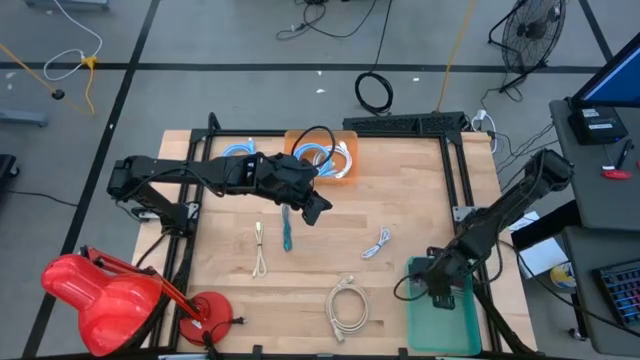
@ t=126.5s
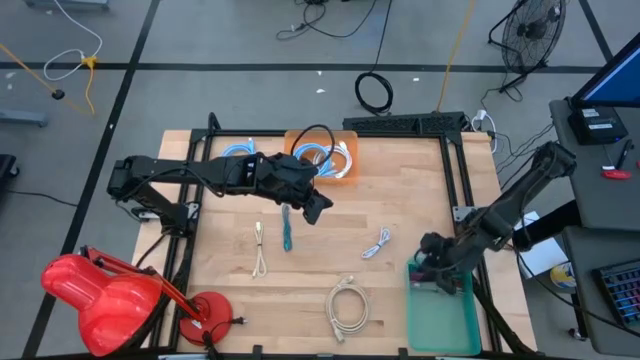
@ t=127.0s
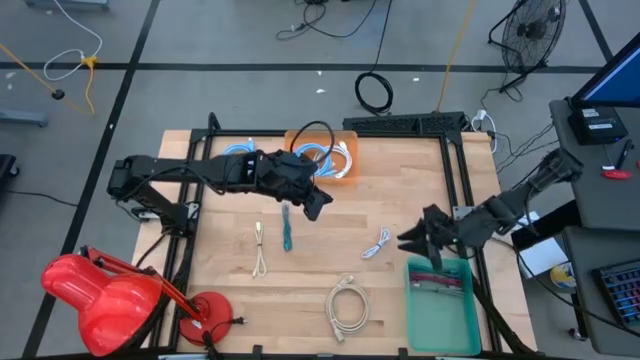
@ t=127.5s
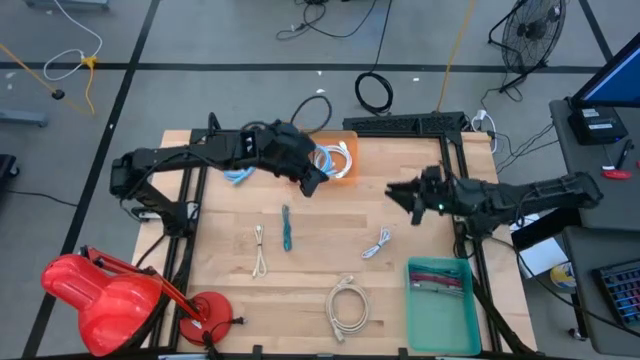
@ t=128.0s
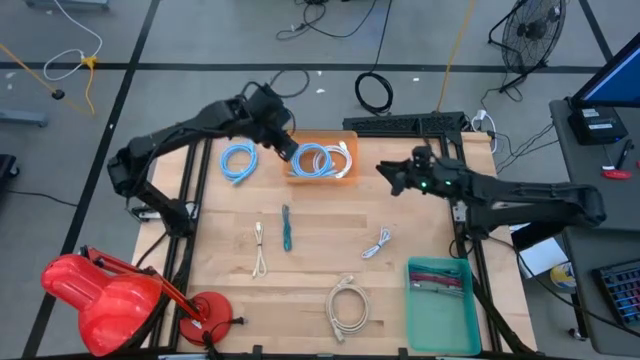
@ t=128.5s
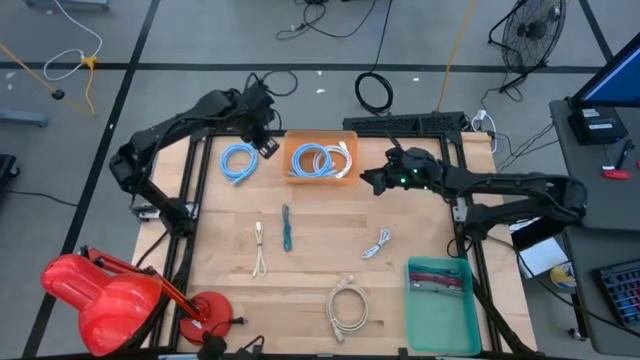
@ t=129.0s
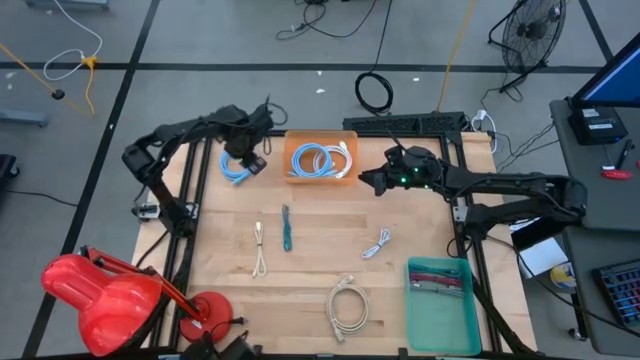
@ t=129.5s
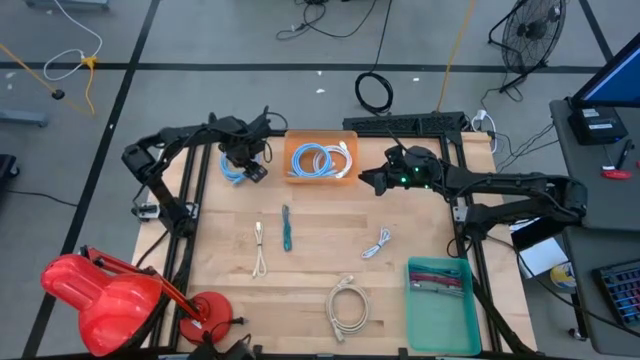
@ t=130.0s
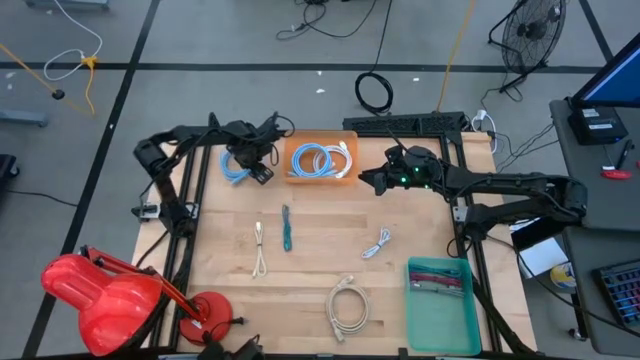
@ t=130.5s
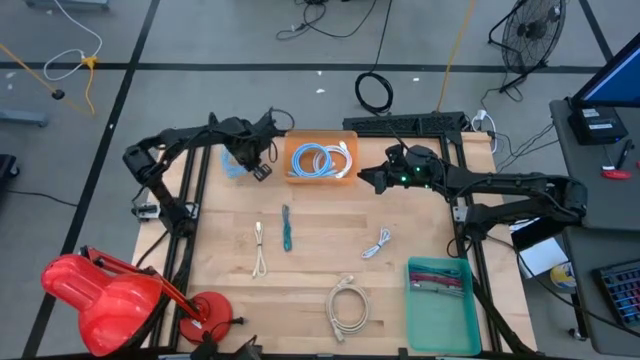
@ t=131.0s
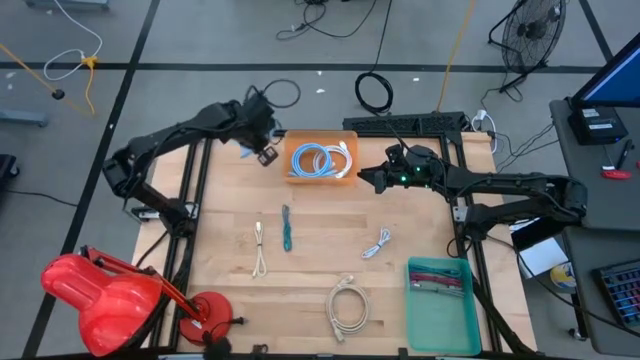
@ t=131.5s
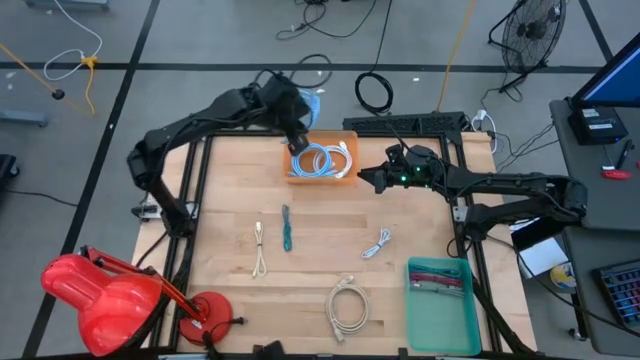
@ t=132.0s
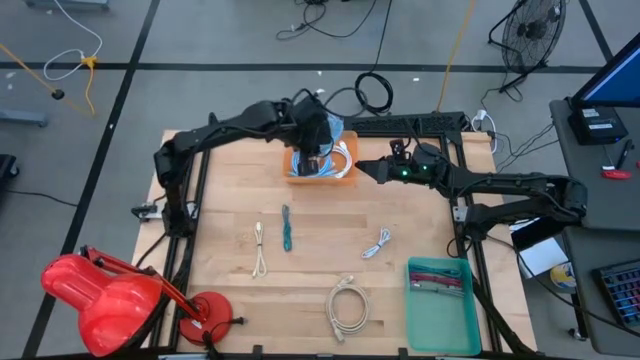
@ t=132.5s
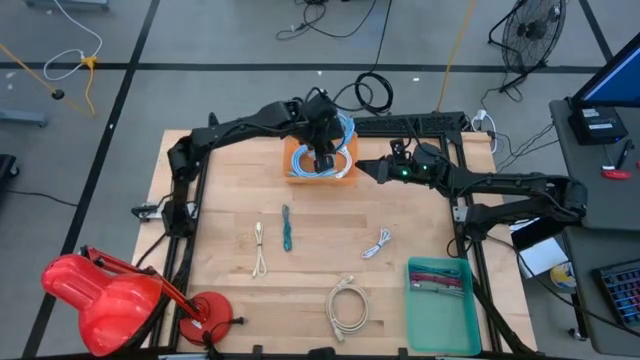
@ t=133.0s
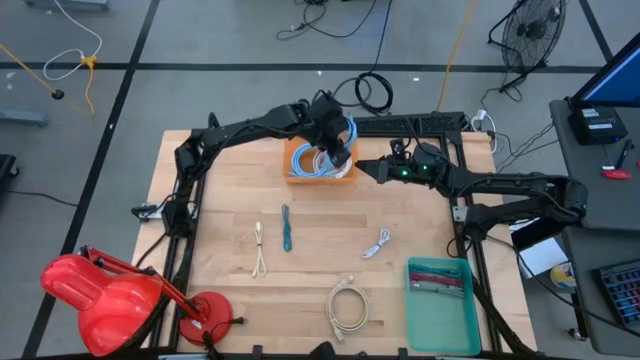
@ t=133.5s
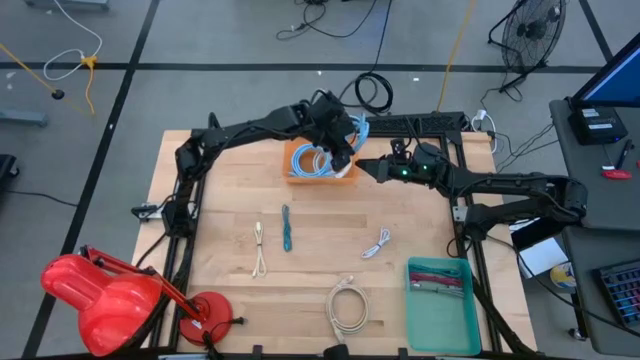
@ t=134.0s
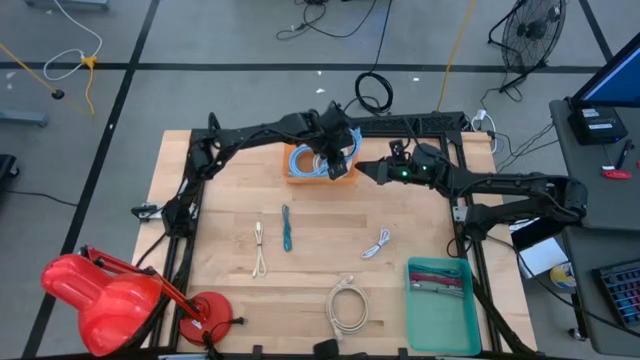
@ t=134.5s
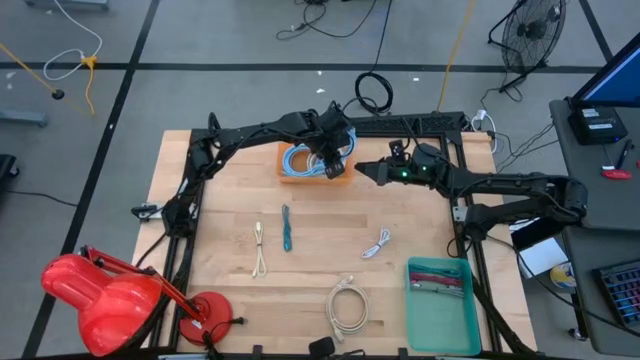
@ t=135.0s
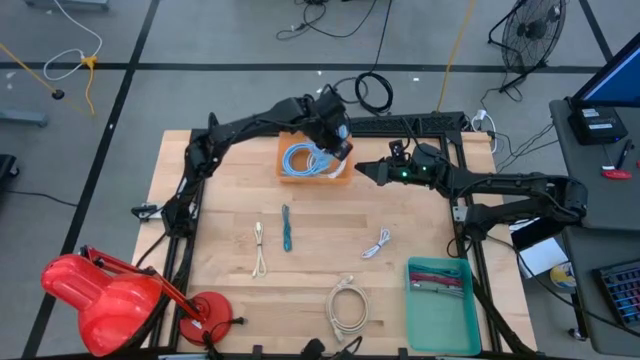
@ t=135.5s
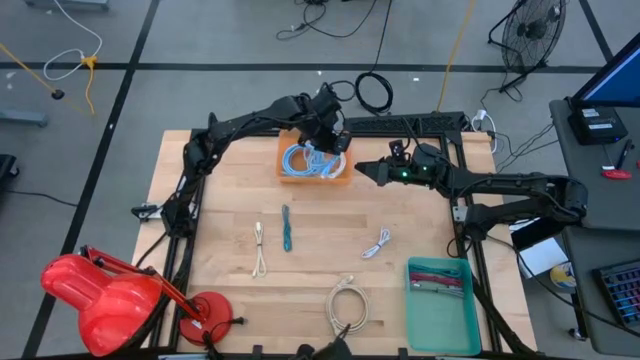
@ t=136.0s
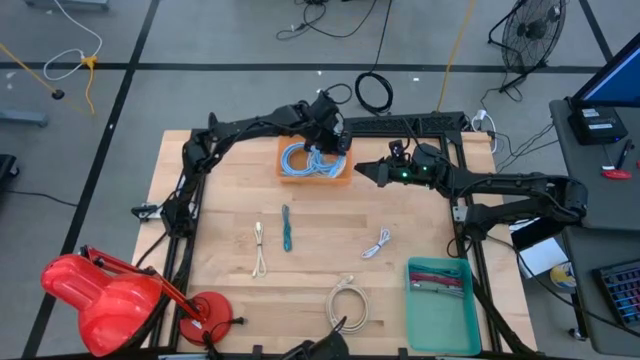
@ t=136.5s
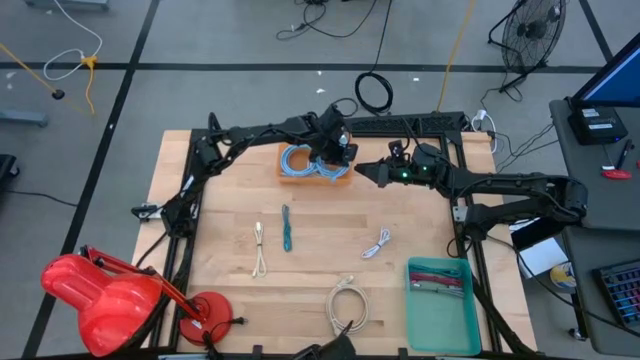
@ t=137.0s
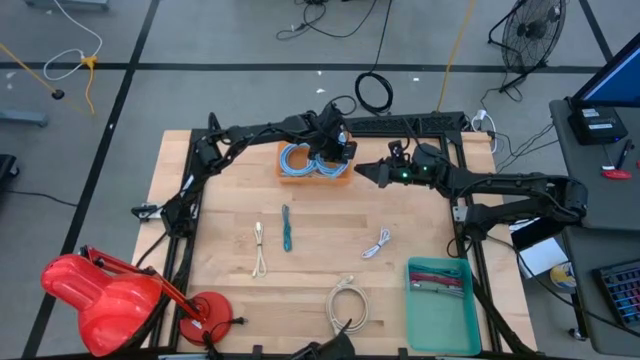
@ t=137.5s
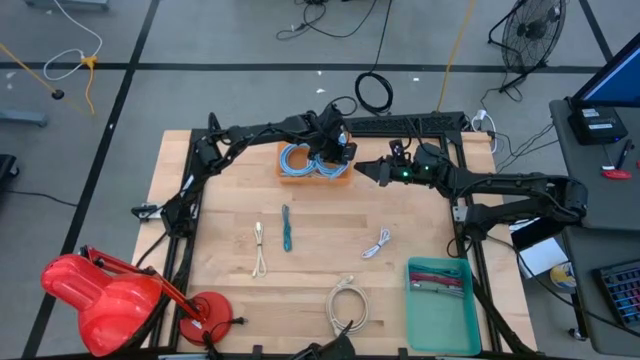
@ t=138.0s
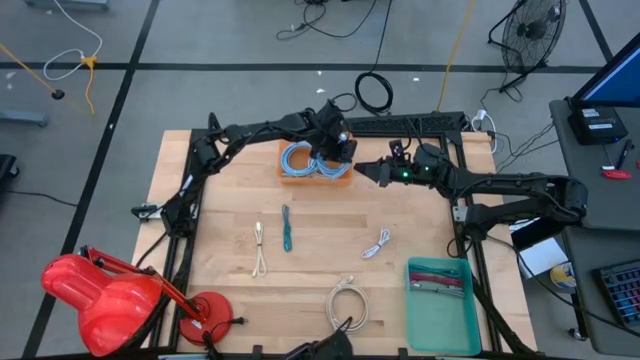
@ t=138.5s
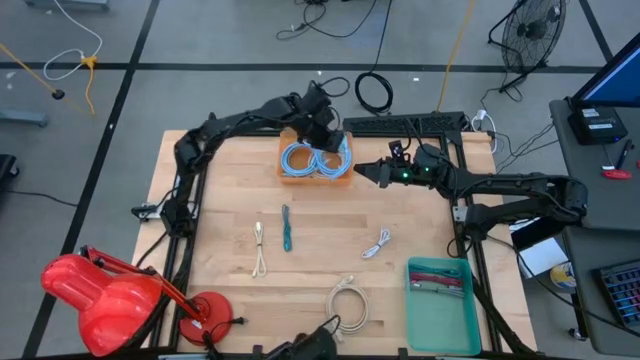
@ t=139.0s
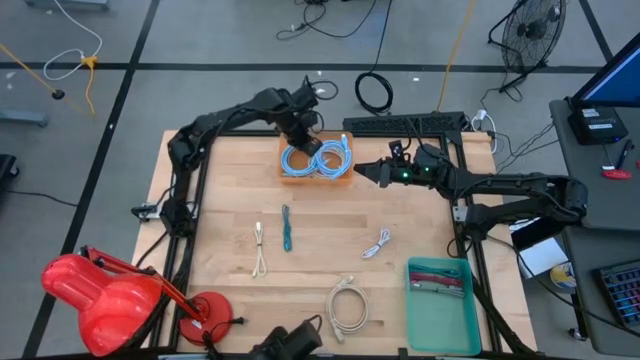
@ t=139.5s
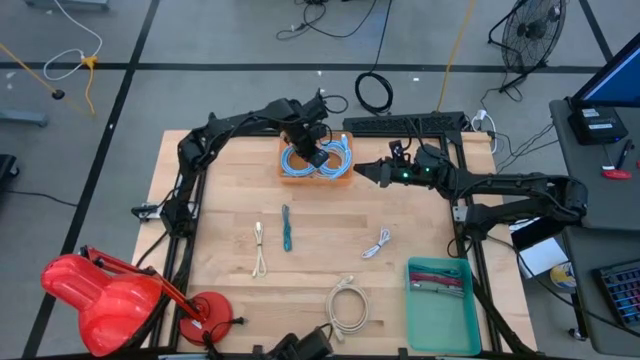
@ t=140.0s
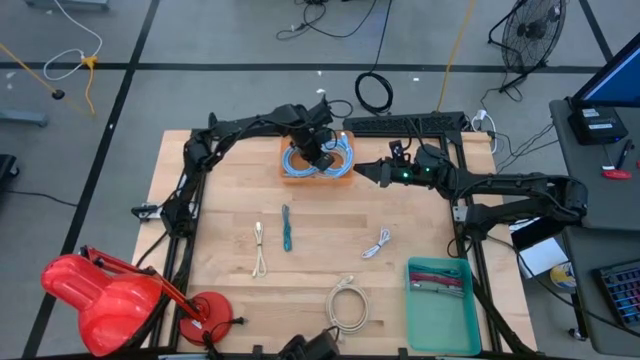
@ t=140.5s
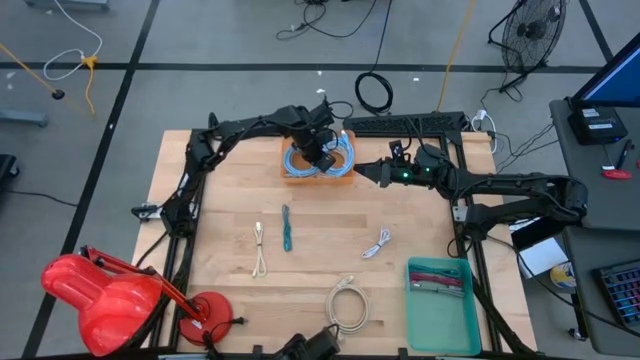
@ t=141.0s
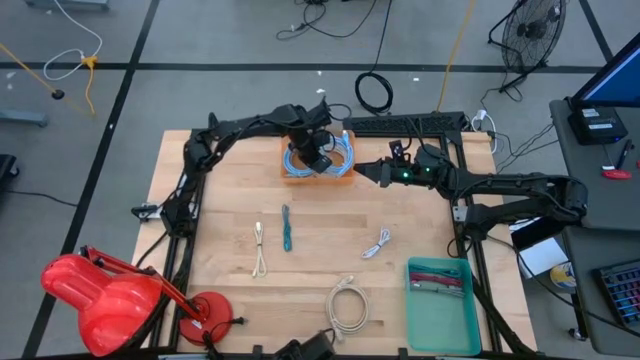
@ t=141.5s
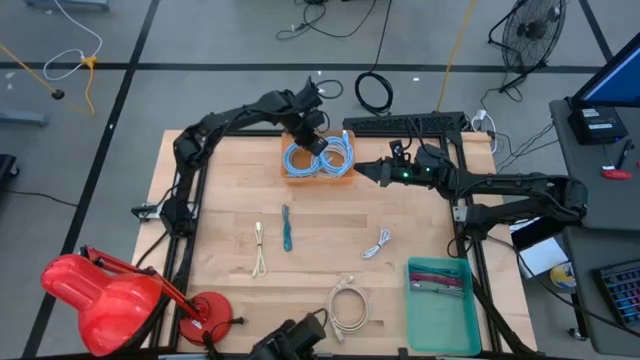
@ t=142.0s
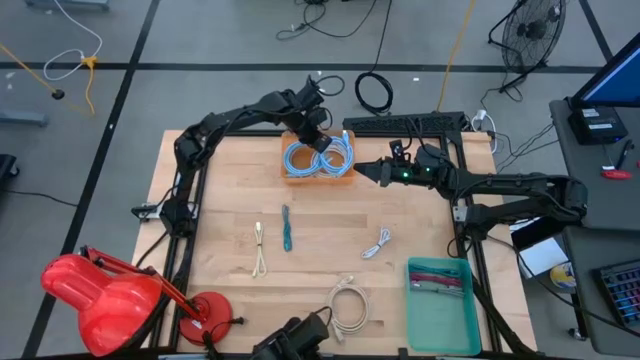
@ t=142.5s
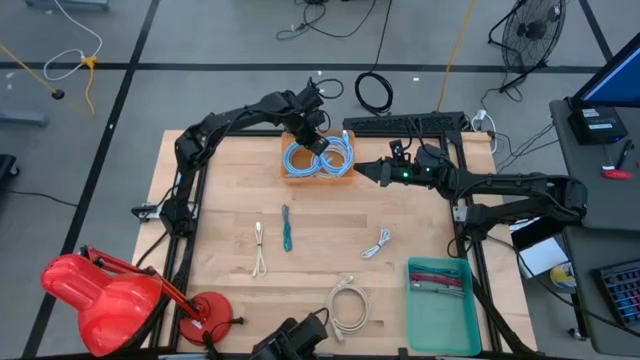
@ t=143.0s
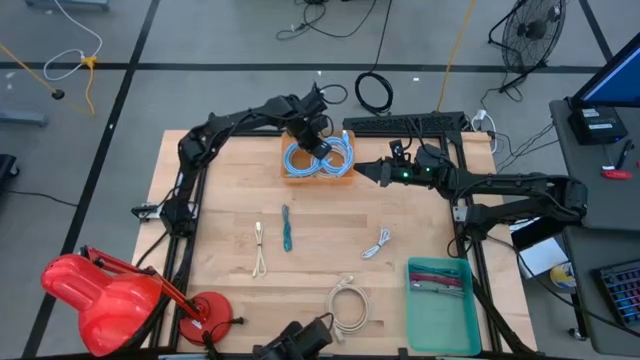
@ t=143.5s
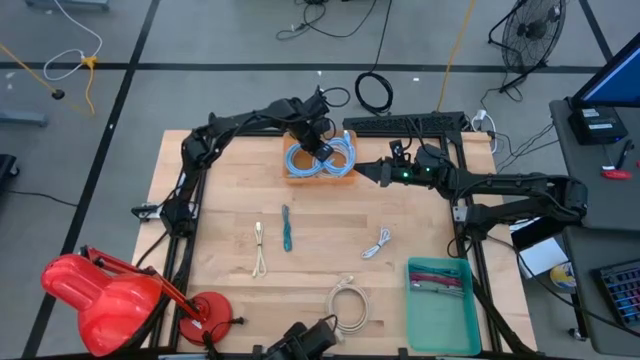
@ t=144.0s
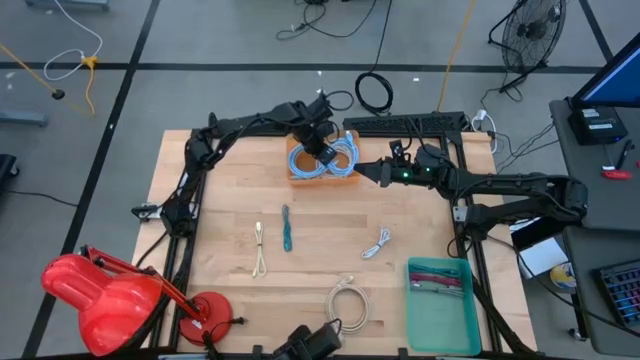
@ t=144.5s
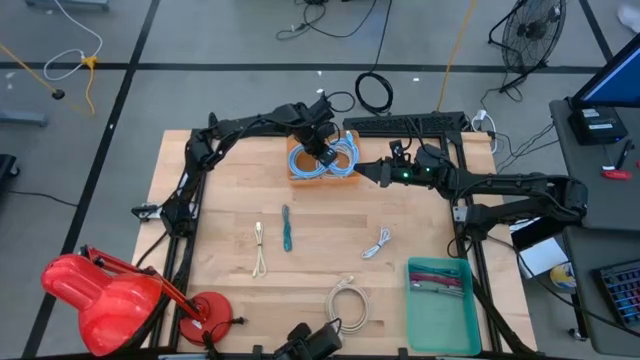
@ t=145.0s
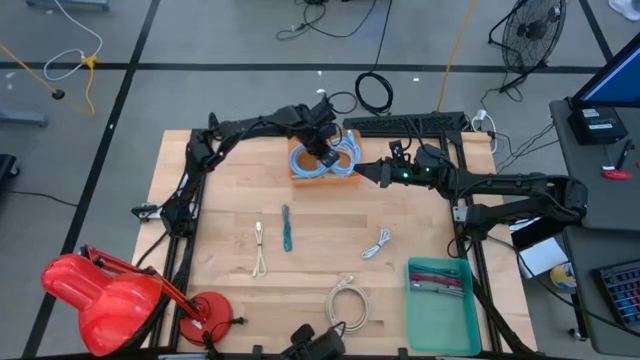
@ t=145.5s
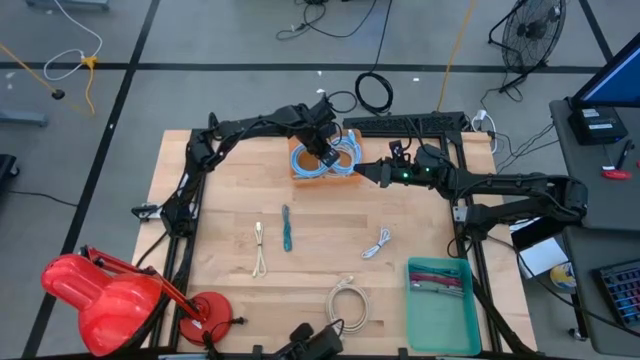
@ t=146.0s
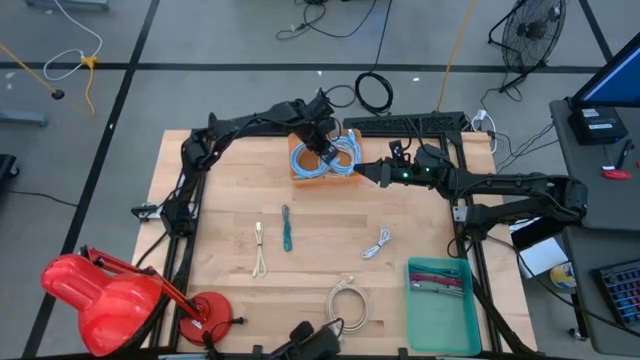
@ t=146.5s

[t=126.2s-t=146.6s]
Task: Pick & Place USB Port
Put the large blue charger cable into the orange bin
